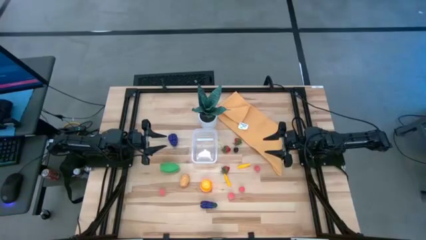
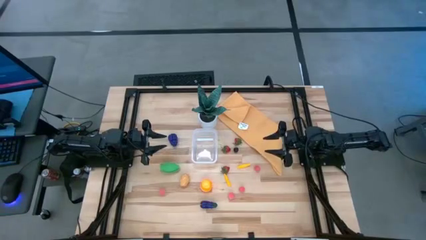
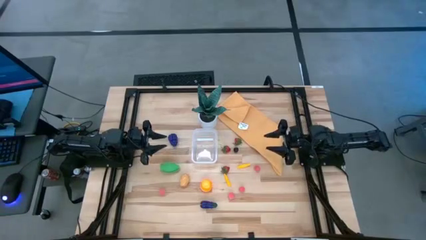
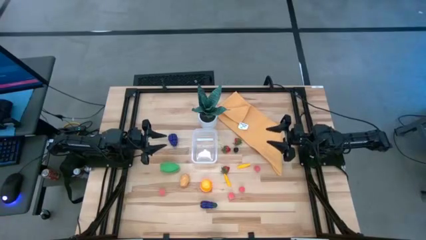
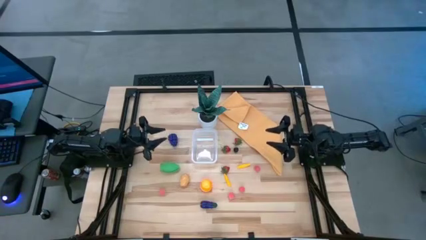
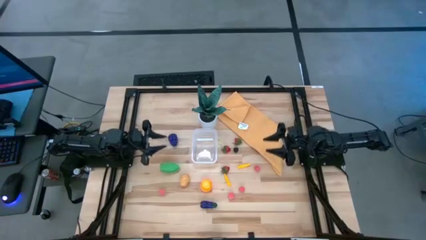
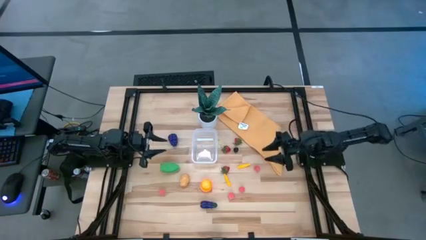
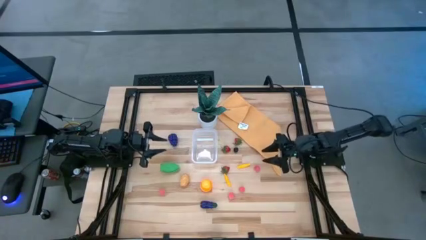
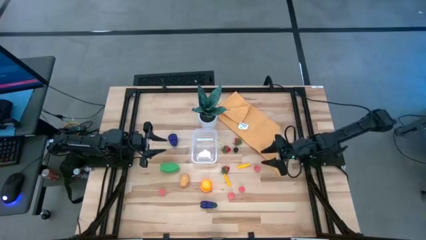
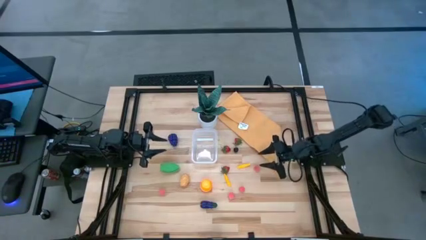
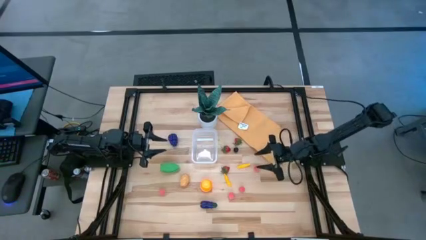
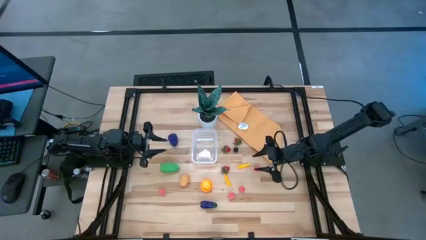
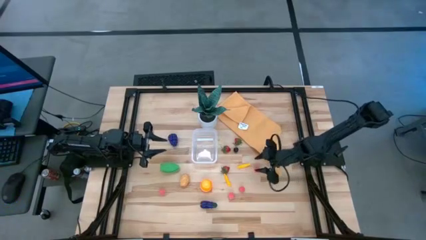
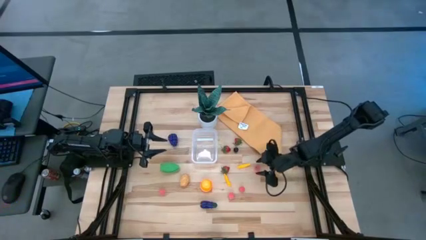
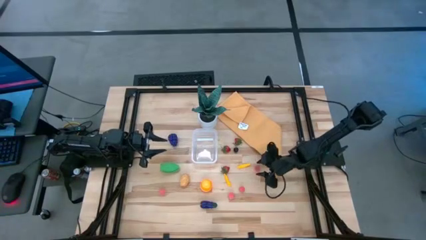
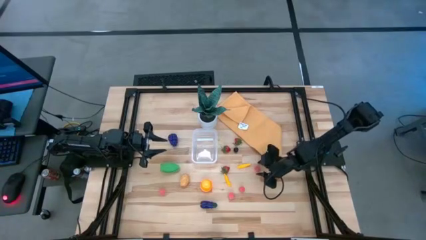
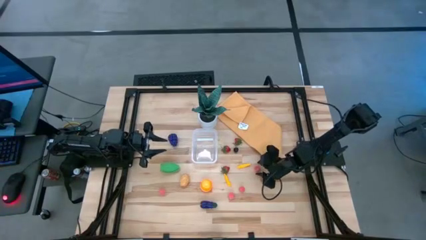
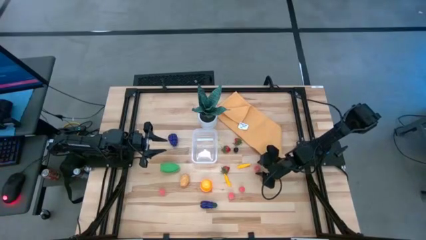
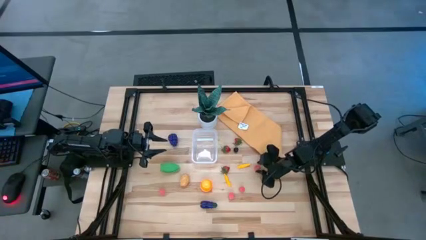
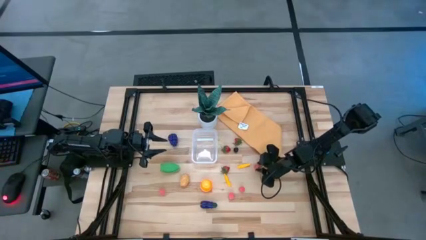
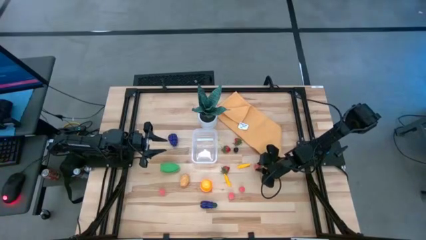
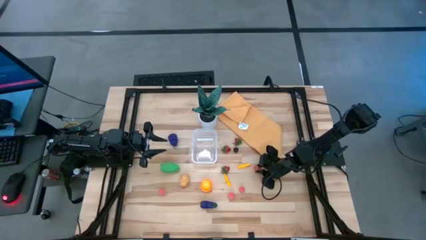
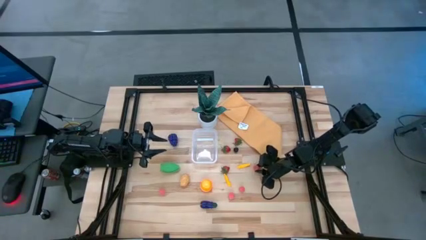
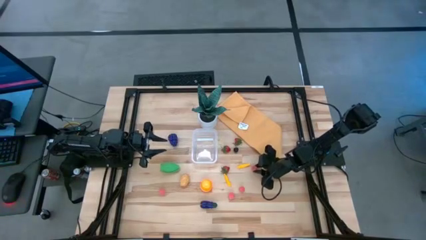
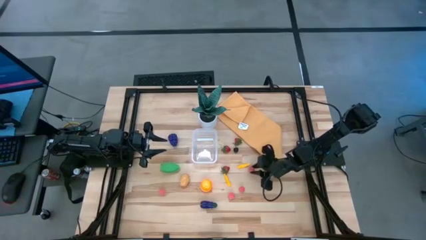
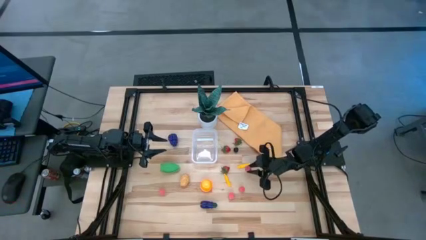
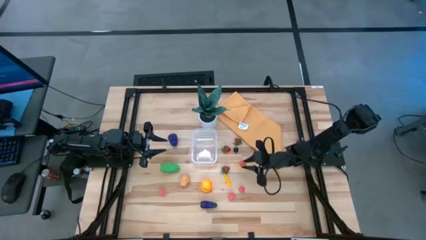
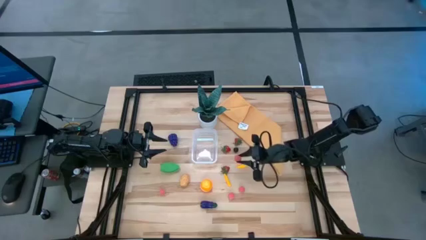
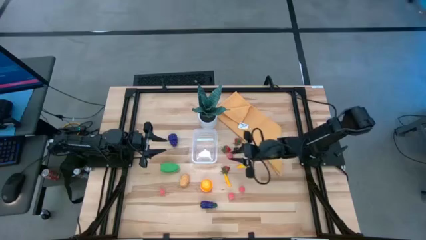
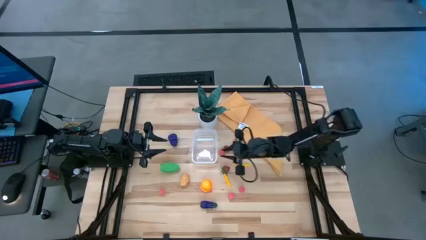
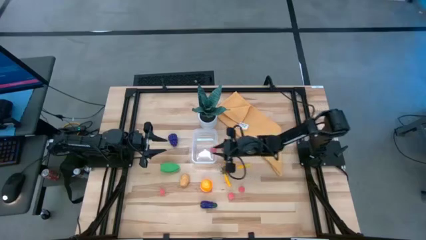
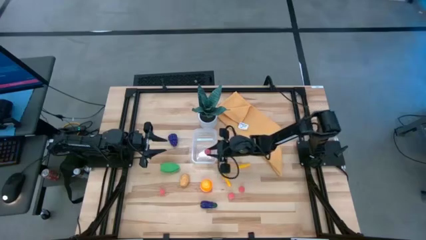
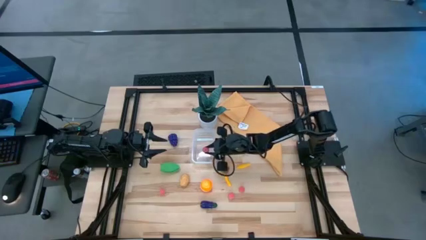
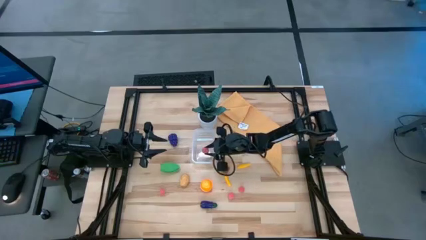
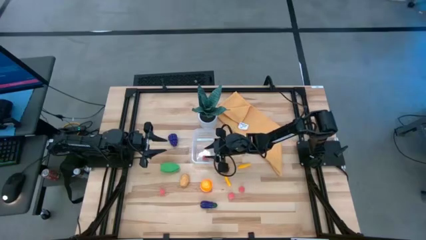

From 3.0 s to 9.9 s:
Task: Pick and placing Produce into tupperware
Put the peach into the transparent bin

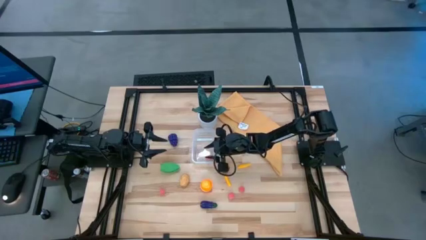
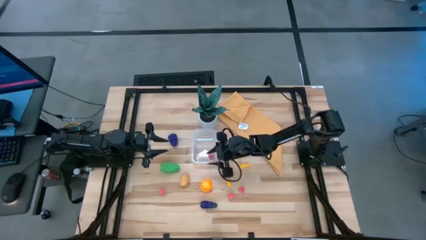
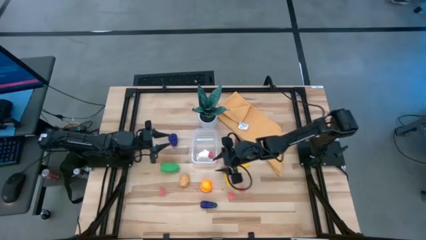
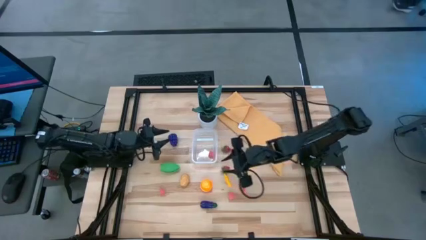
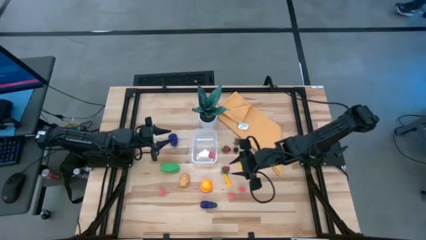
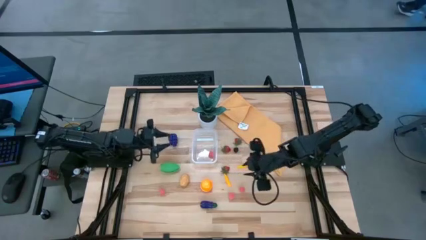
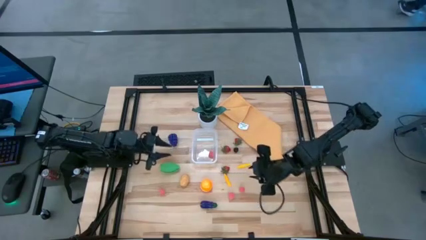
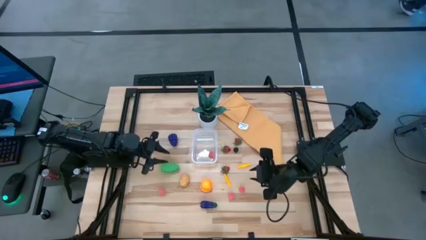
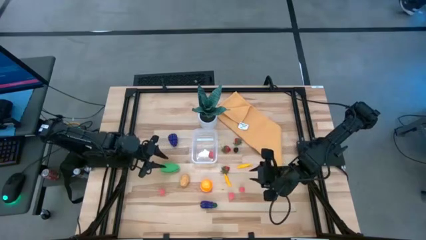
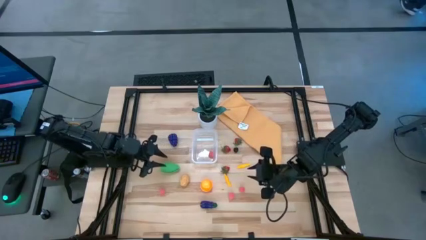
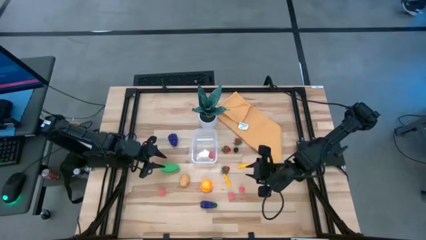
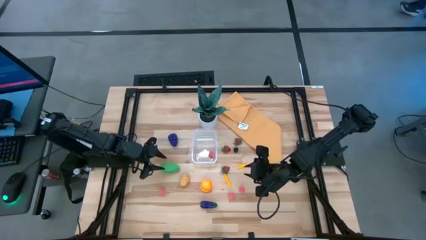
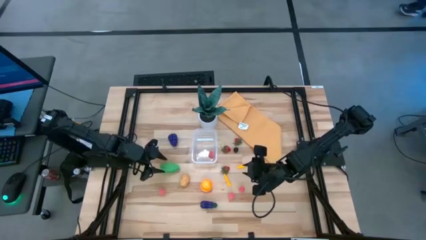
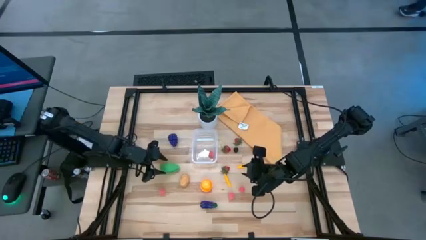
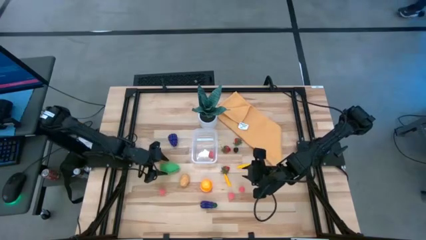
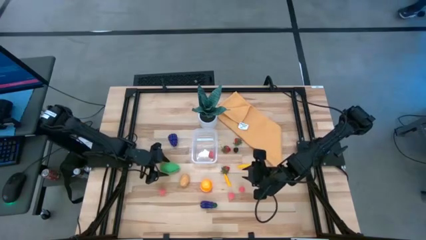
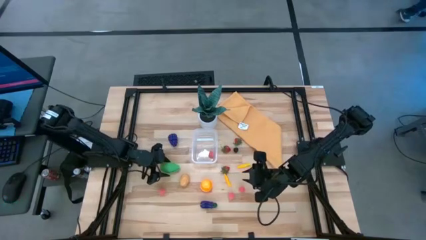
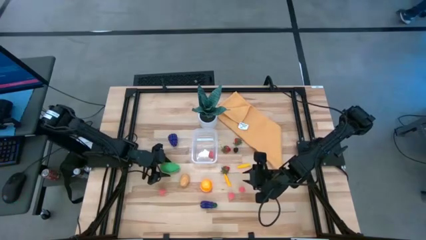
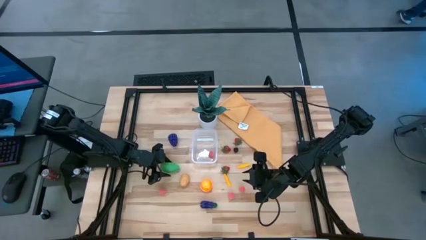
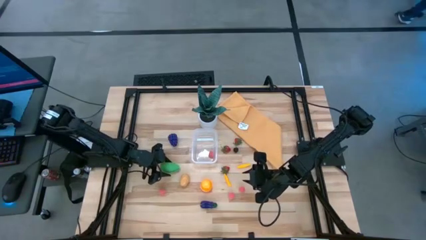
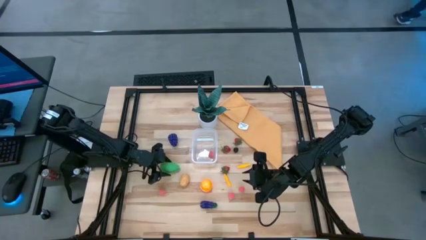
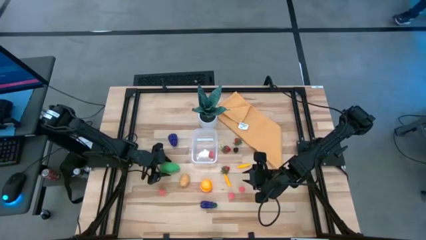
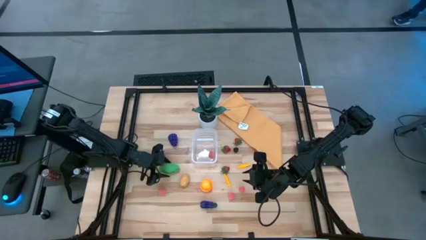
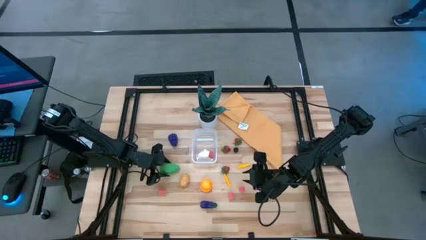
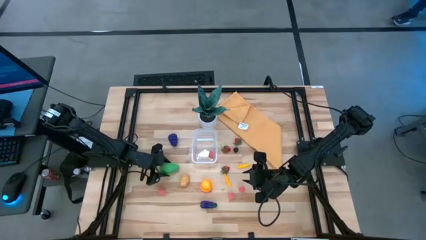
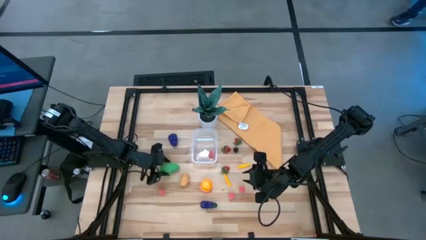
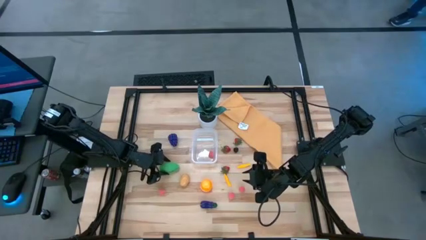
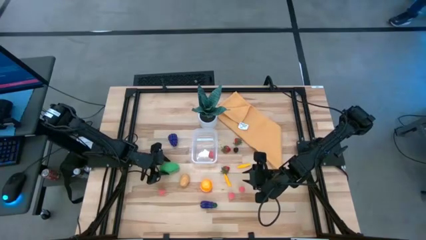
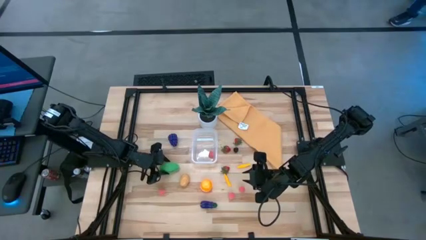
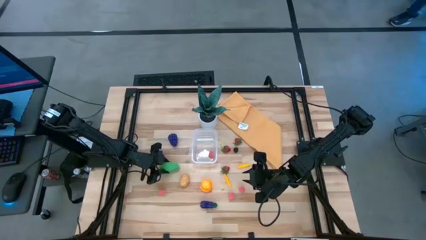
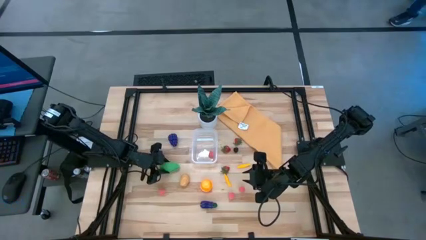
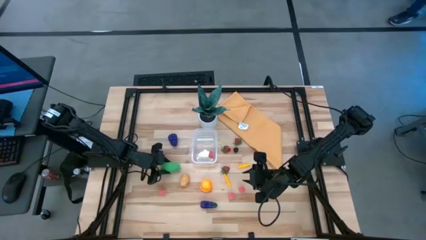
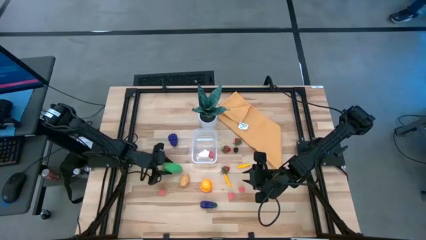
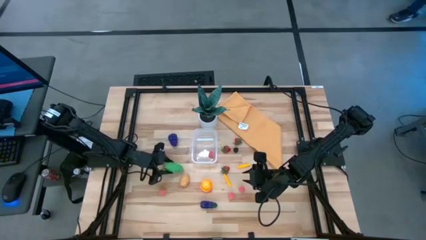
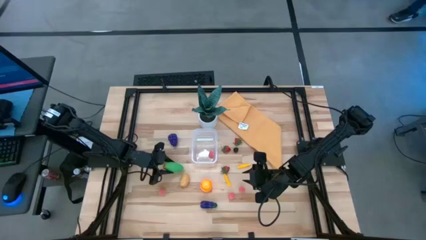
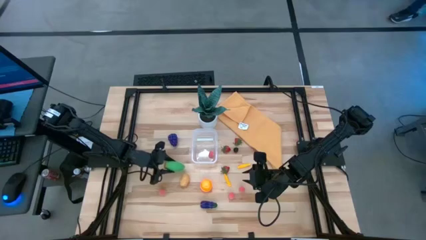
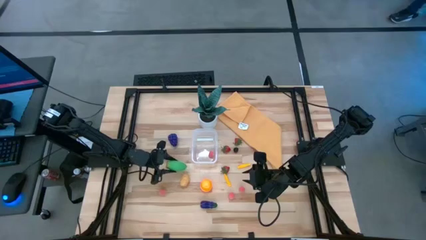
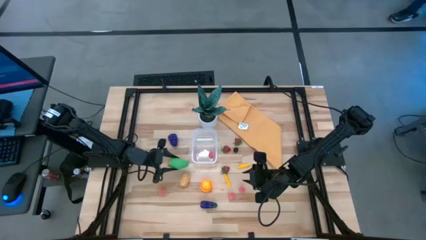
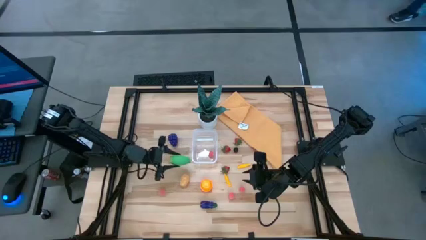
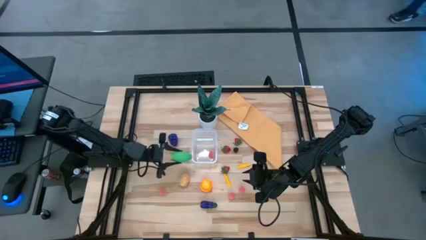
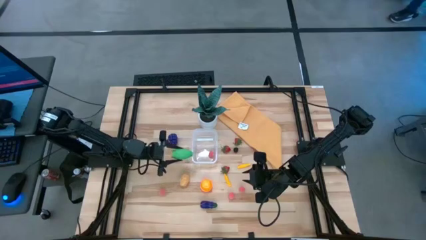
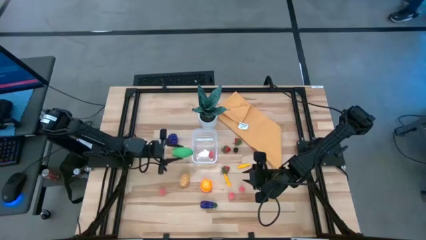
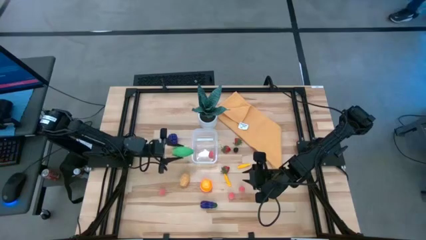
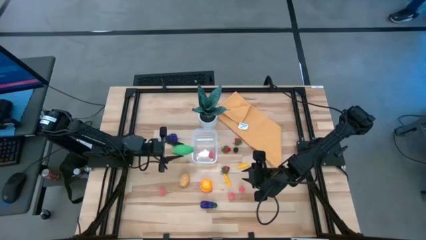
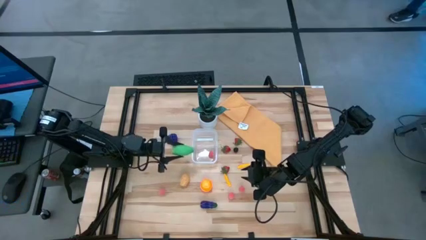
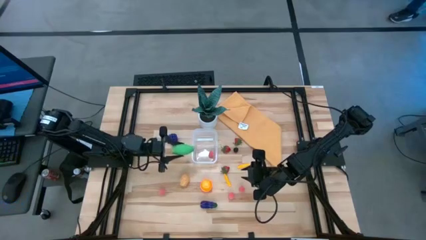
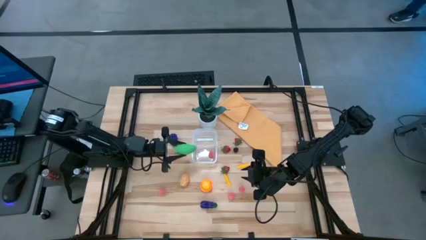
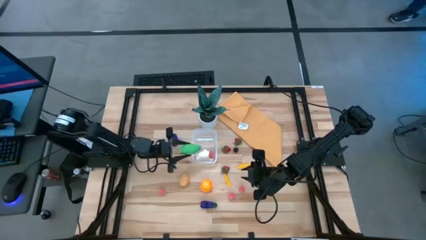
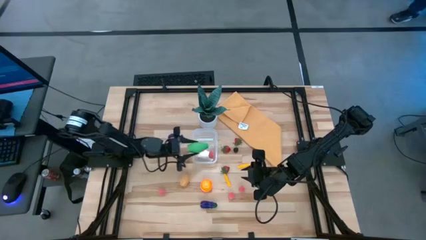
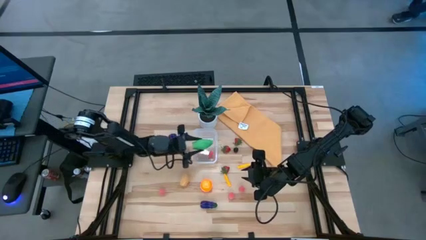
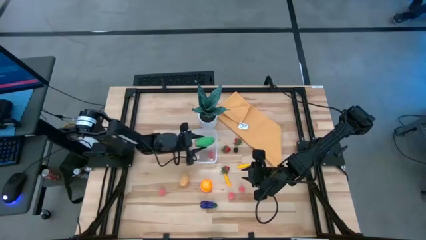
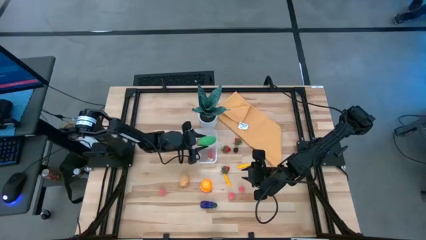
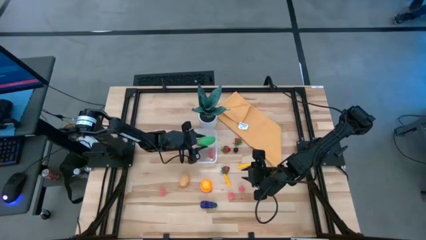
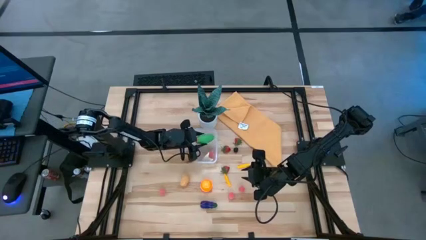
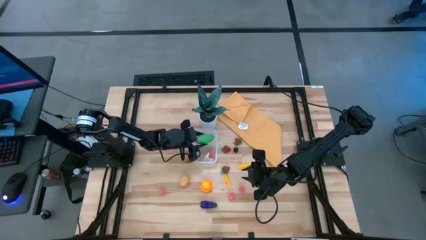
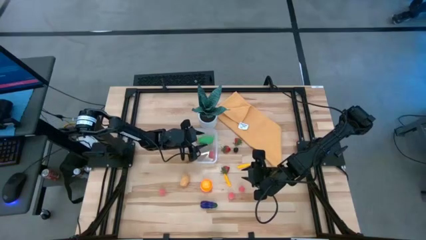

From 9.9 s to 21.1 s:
Put the green corn into the transparent bin
